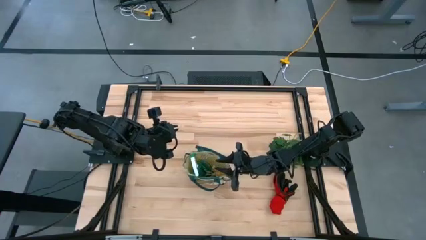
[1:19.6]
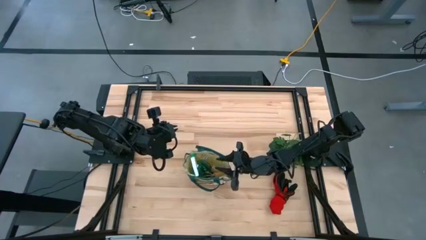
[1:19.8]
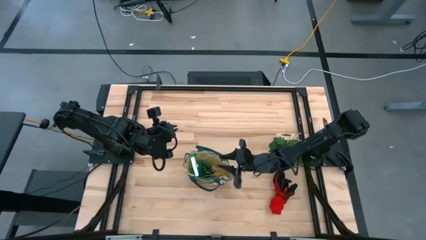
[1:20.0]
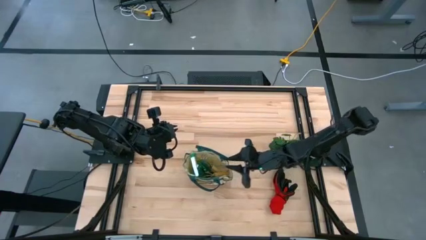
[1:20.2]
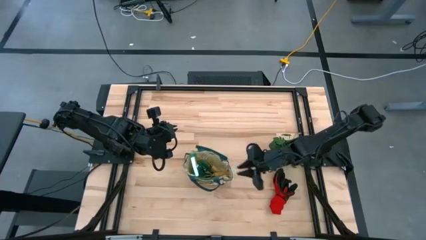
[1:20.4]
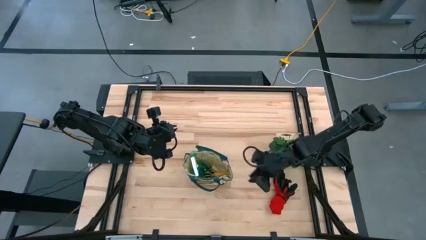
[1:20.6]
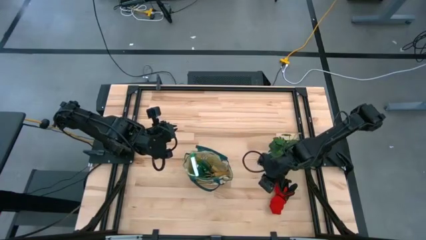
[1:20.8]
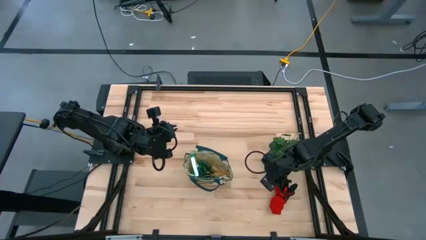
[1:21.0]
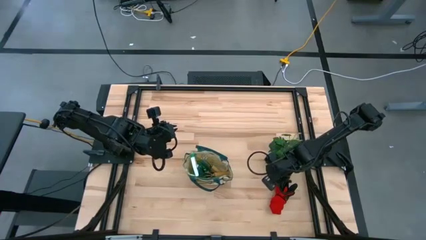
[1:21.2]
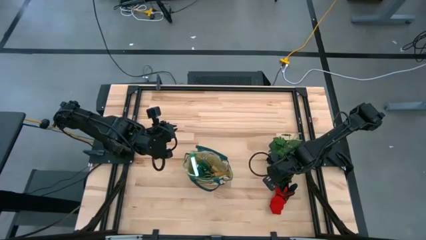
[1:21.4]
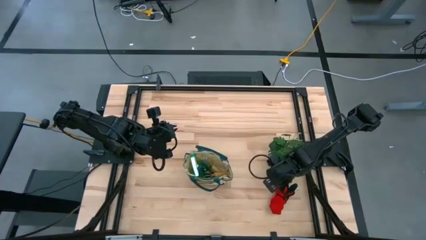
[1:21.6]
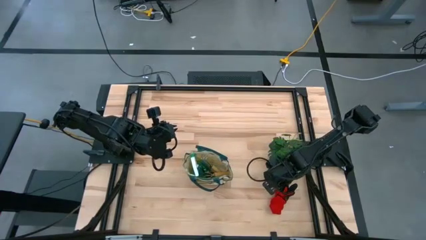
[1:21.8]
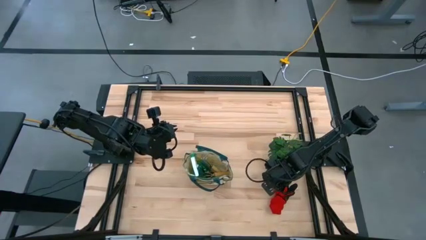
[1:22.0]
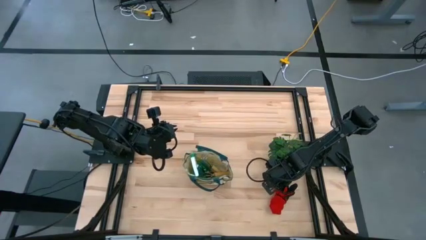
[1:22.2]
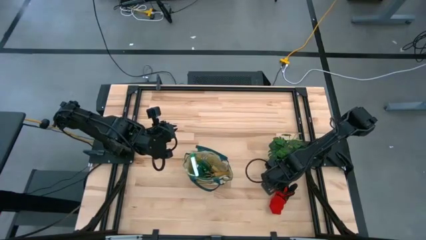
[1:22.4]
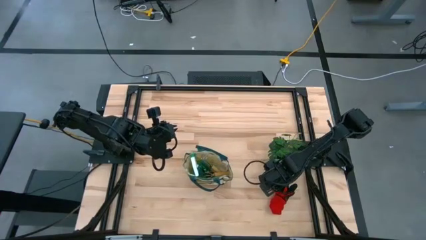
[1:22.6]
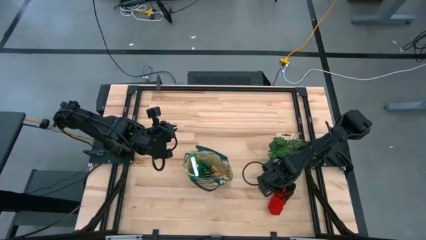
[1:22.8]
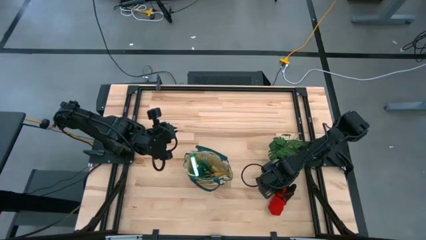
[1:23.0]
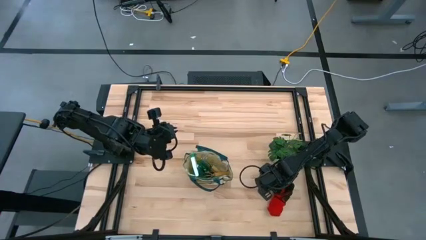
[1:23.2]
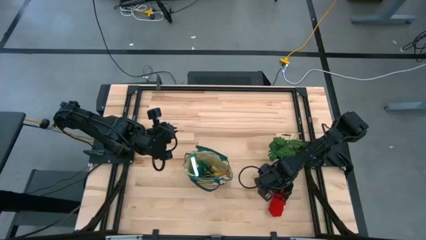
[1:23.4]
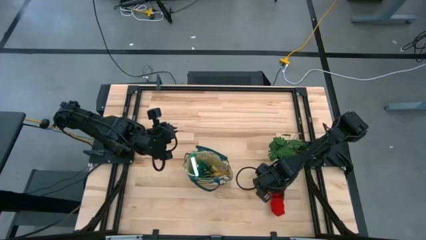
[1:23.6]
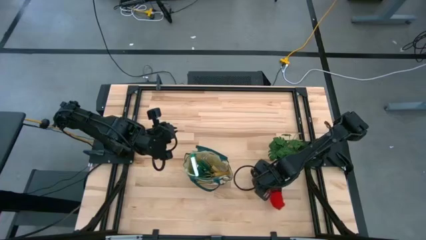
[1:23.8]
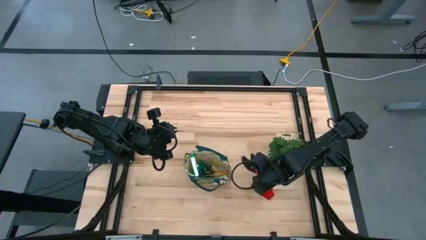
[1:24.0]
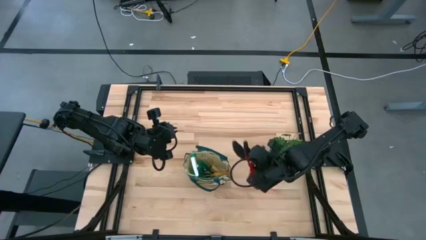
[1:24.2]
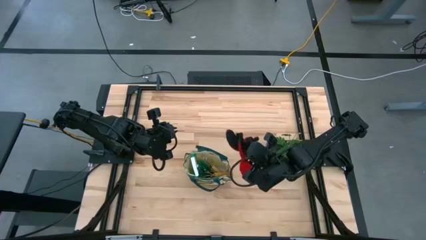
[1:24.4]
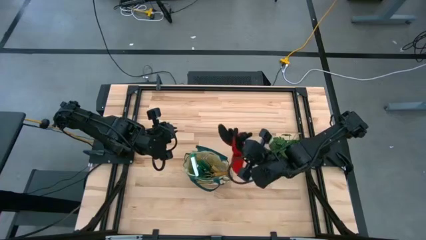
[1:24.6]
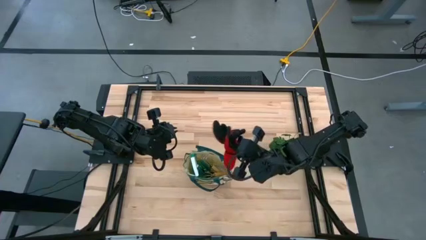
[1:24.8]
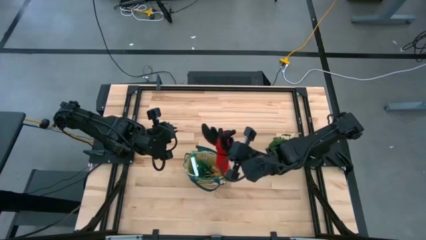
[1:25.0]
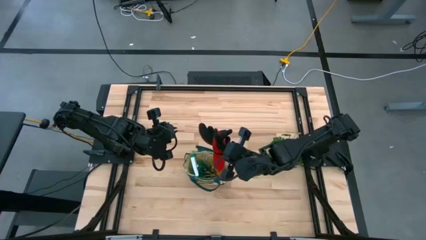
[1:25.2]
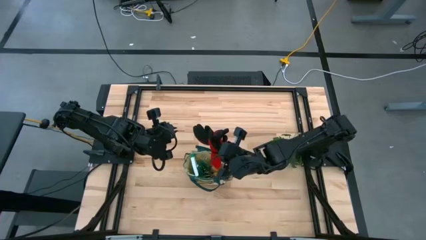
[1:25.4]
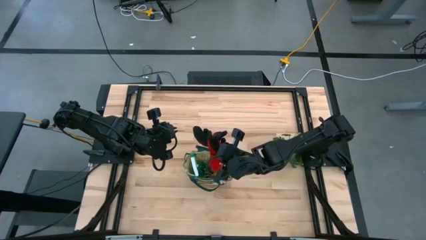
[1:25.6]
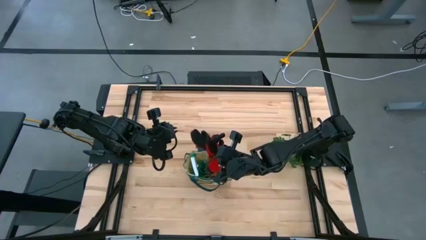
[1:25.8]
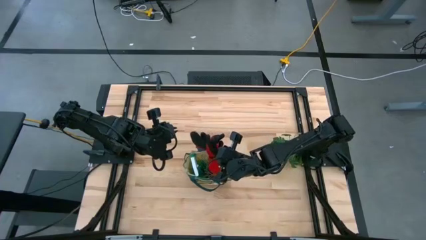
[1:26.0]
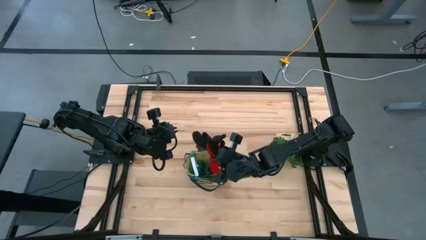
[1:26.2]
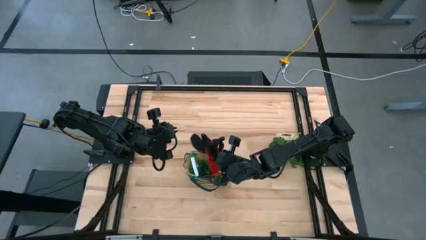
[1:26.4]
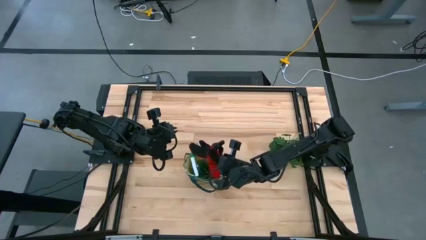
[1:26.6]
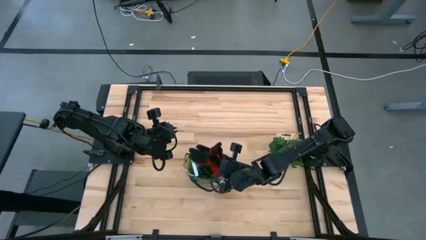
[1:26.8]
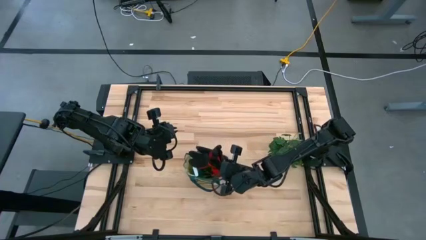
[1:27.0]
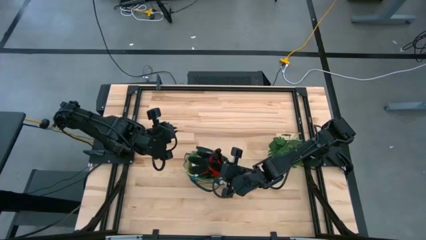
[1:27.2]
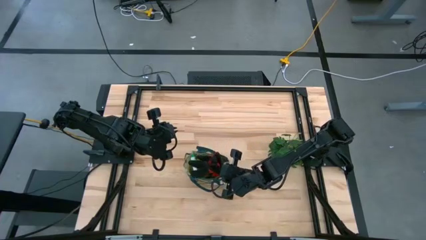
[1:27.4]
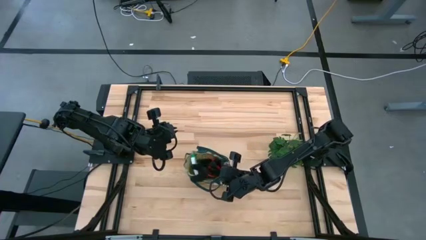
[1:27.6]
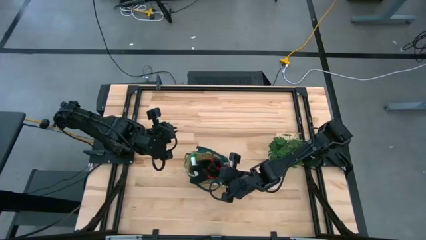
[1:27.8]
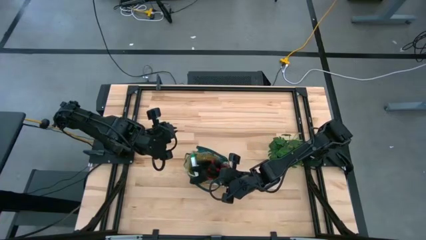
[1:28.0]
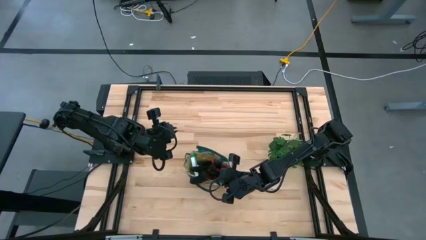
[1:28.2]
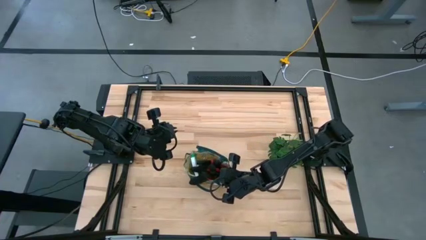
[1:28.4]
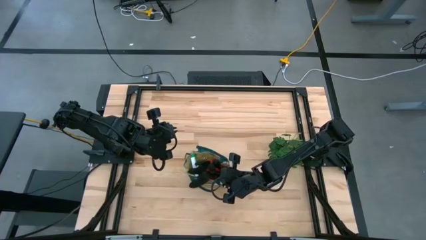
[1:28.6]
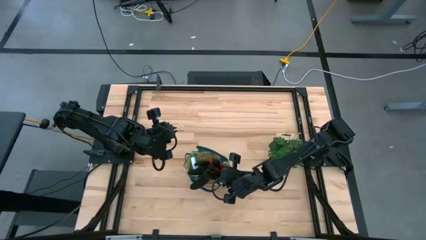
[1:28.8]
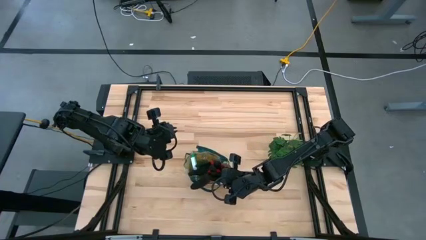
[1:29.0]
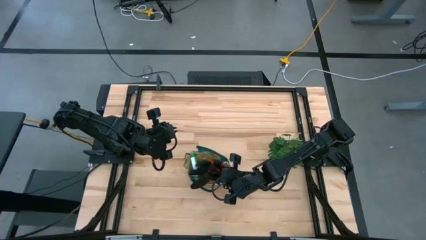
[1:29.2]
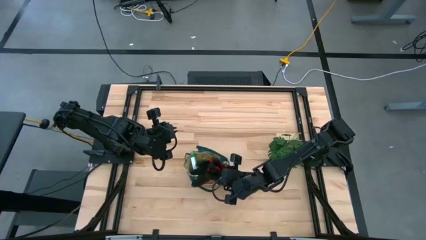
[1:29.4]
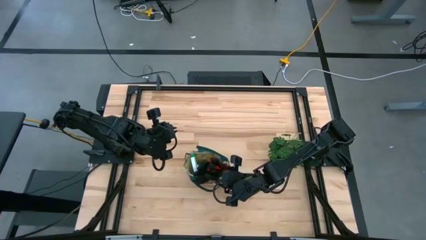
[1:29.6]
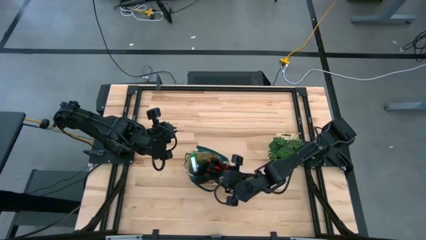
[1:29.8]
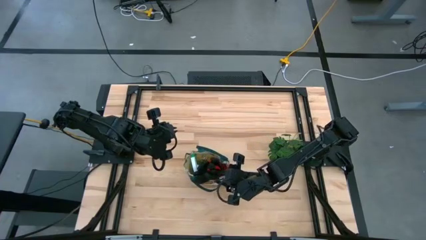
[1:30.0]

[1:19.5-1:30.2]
Task: Pick & Place Garden tools in Gardening bag
Put the red gloves into the gardening bag

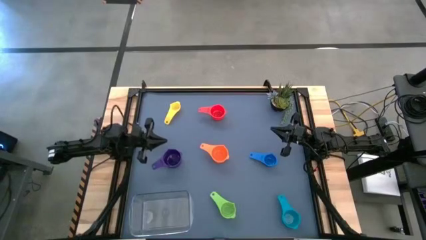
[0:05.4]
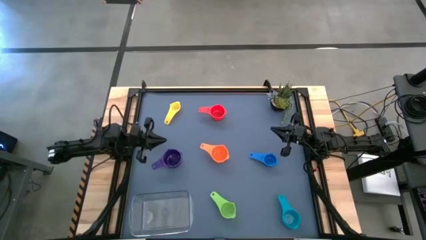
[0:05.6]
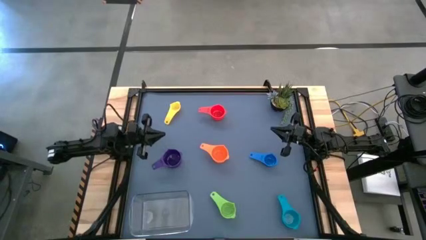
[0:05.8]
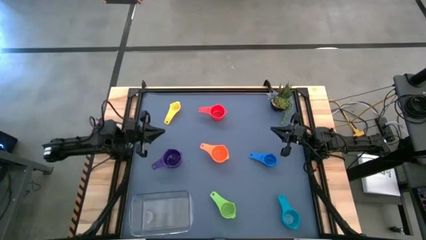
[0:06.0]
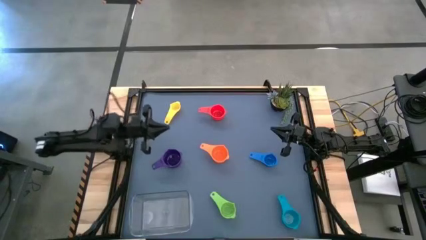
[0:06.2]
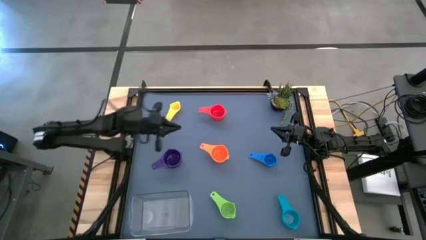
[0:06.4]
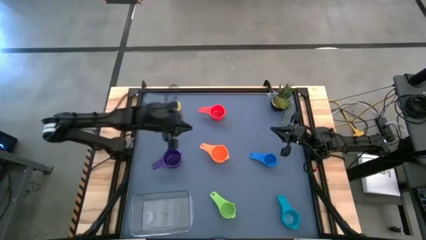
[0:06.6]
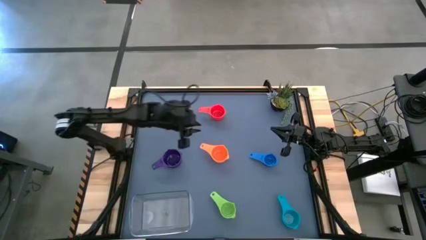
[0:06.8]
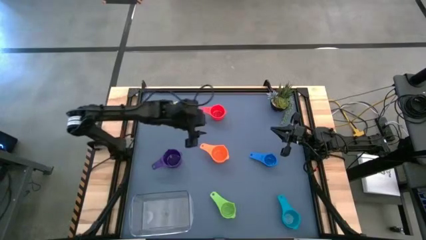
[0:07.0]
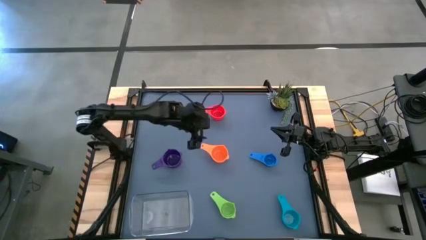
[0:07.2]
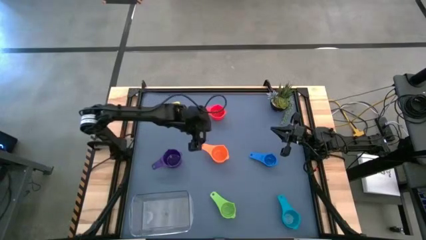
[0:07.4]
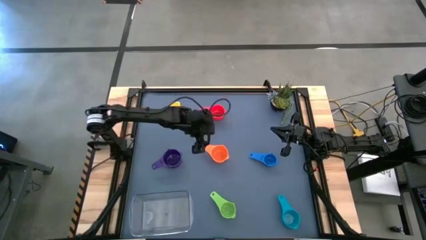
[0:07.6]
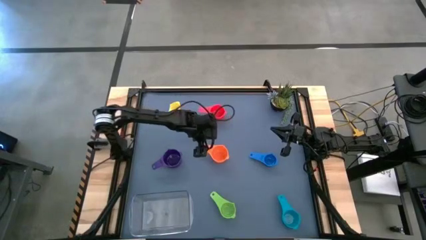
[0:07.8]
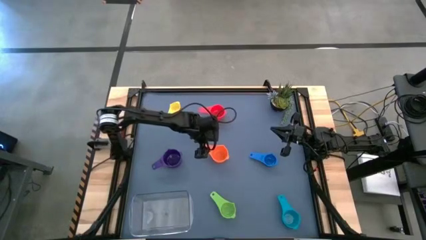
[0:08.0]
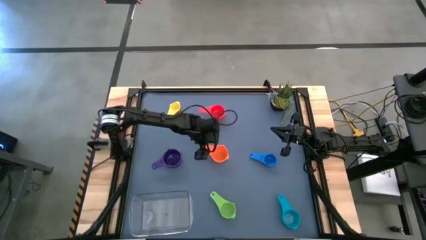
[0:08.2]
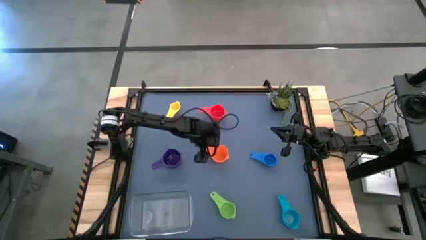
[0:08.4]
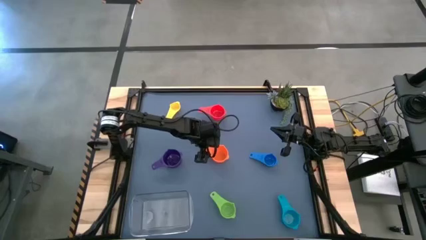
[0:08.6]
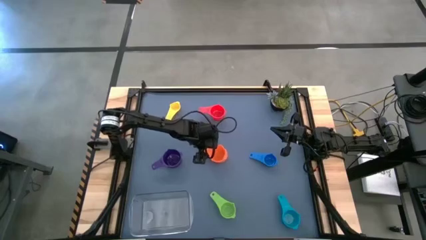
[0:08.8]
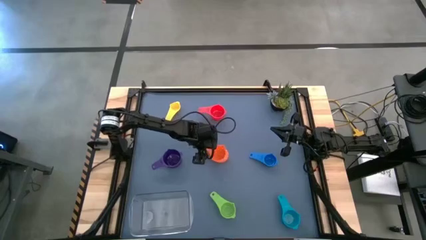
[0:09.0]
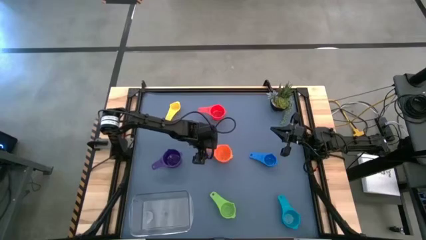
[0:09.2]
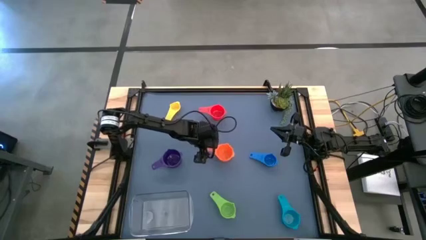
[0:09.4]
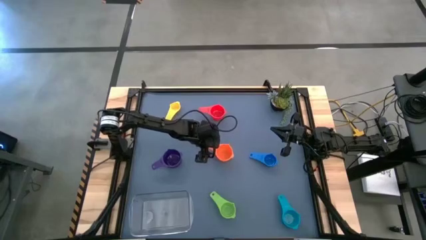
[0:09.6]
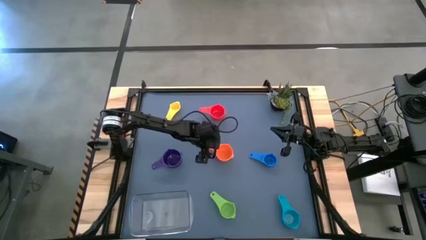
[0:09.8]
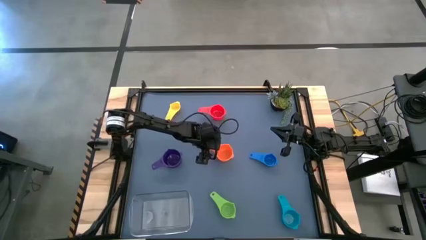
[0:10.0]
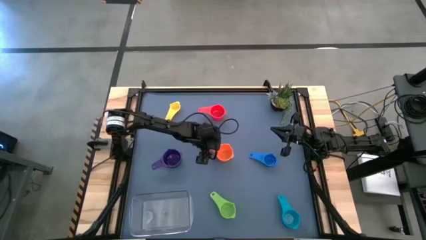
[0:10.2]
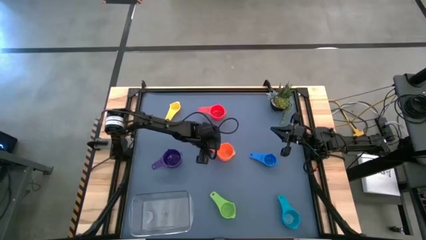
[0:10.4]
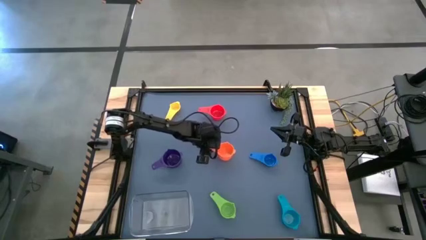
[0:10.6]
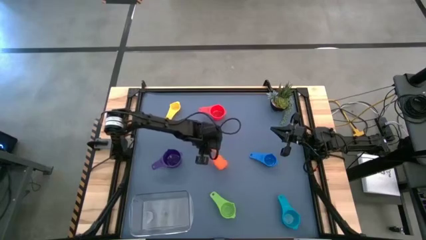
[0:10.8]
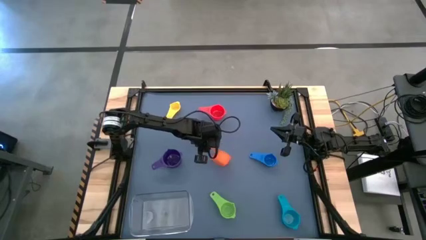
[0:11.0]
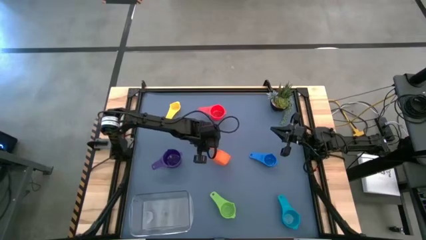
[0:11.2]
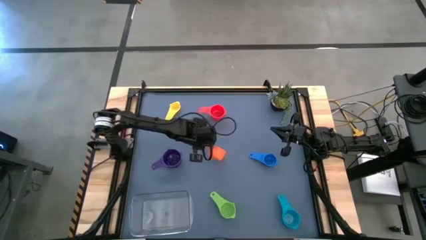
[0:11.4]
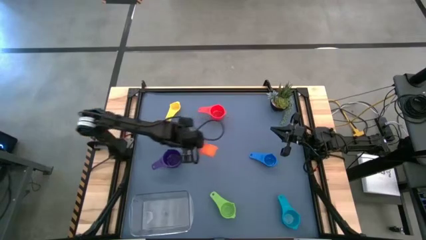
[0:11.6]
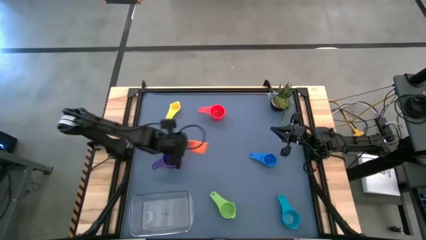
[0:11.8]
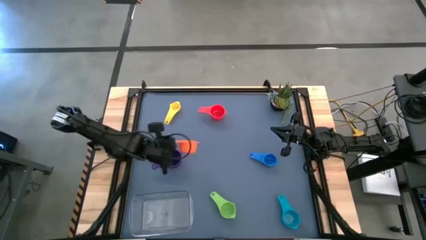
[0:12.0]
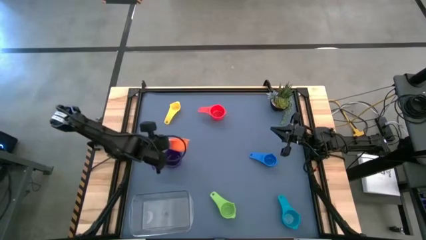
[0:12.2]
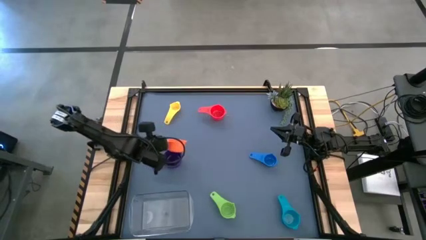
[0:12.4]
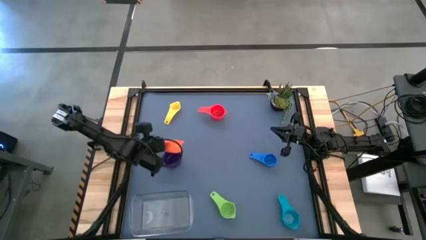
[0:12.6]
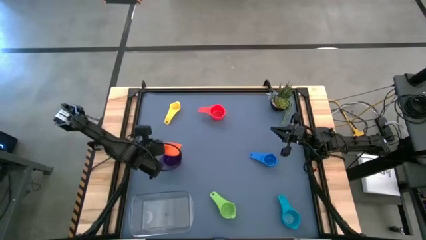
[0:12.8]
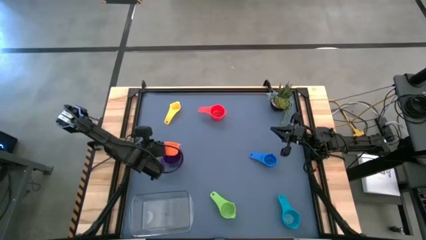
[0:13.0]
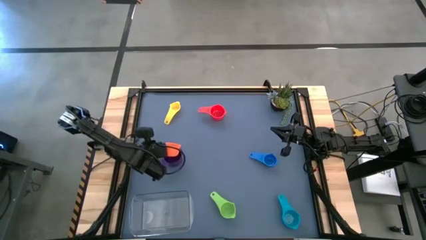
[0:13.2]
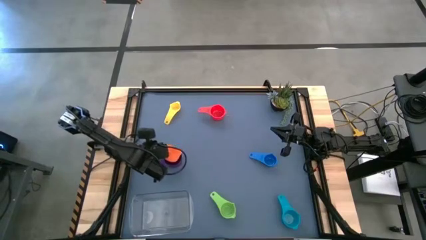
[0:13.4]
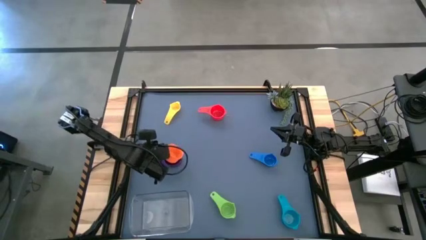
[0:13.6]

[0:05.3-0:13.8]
Task: Nest measuring cups in basket
Stack the orange measuring cup on top of the violet measuring cup
